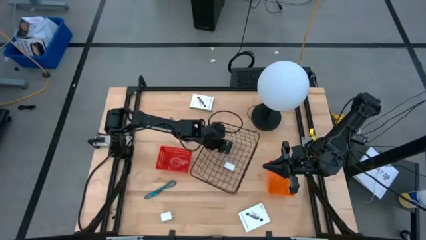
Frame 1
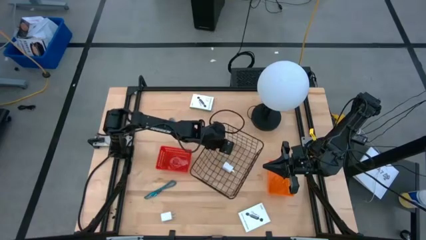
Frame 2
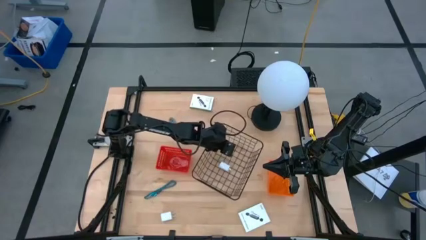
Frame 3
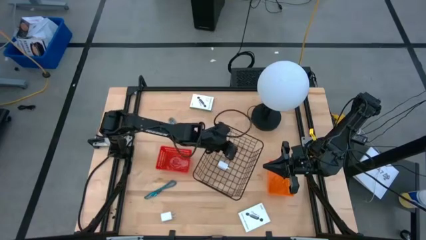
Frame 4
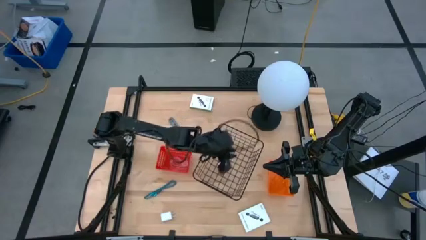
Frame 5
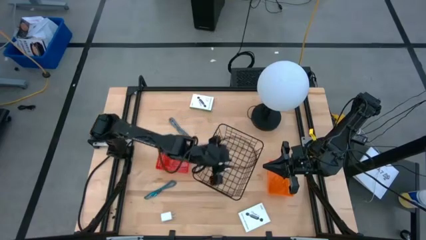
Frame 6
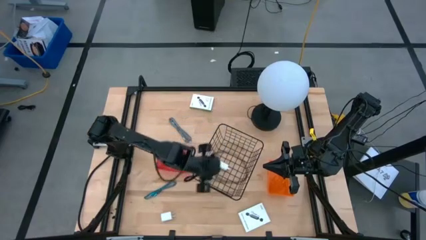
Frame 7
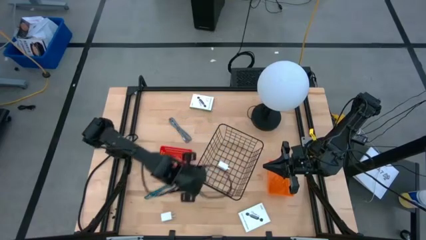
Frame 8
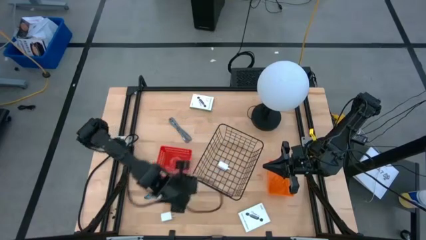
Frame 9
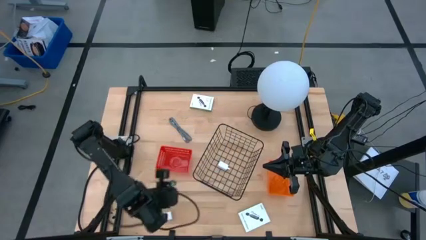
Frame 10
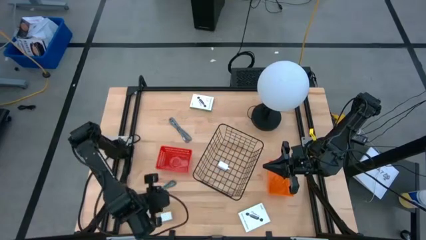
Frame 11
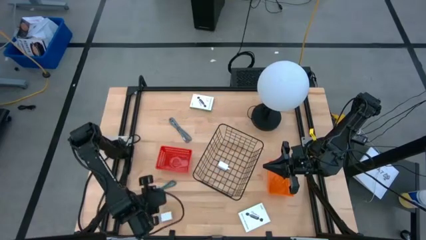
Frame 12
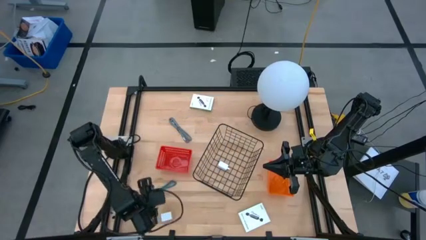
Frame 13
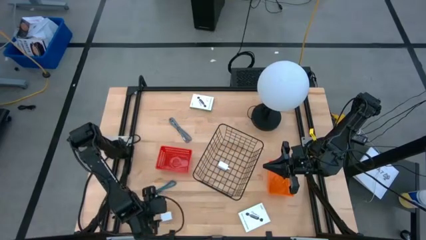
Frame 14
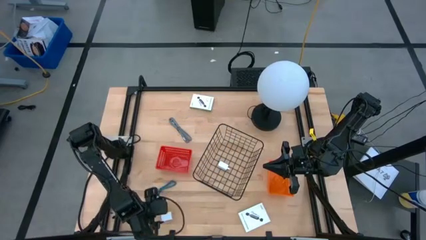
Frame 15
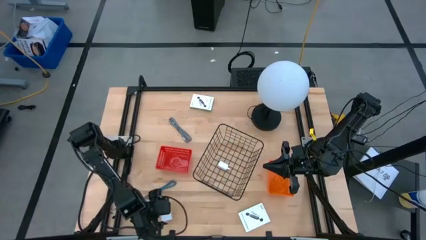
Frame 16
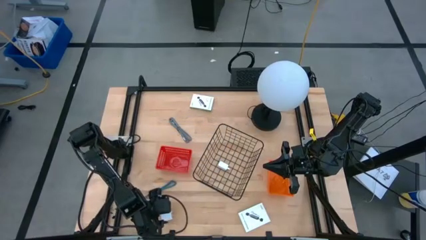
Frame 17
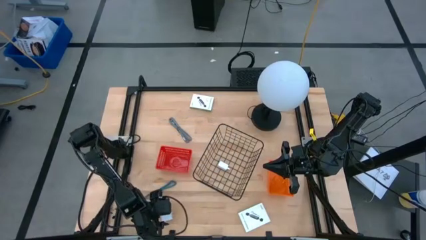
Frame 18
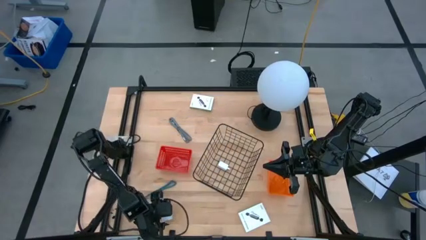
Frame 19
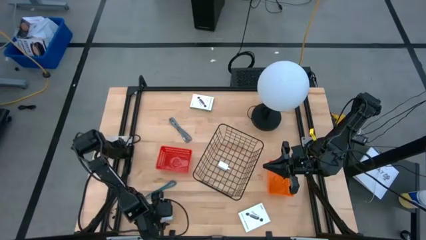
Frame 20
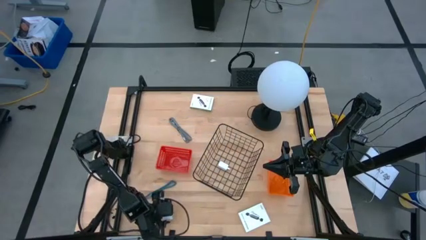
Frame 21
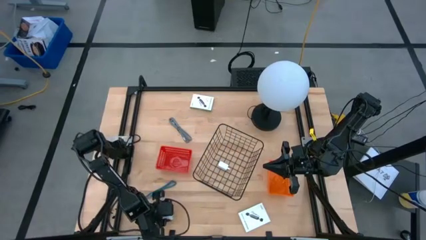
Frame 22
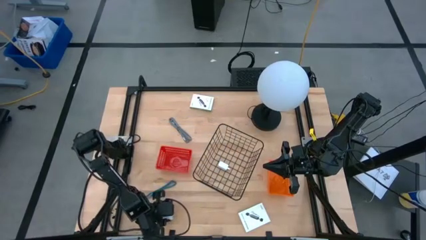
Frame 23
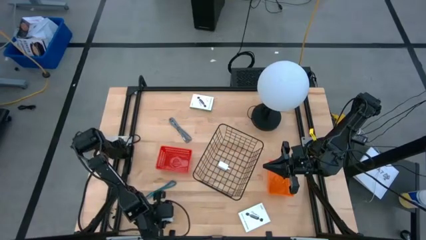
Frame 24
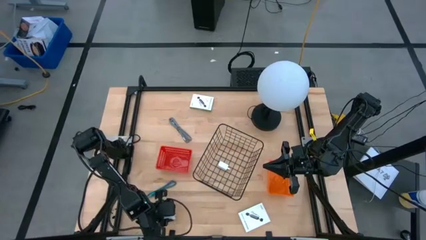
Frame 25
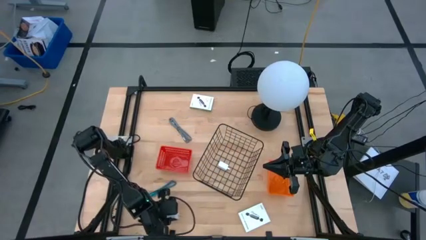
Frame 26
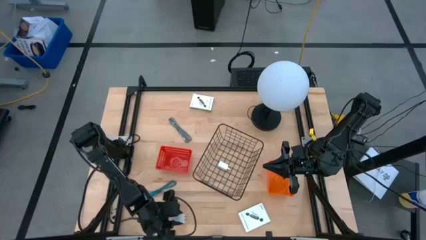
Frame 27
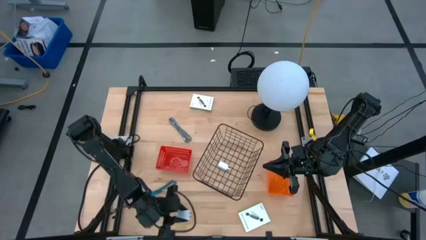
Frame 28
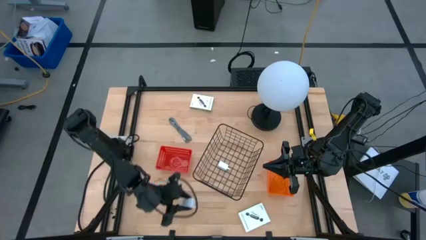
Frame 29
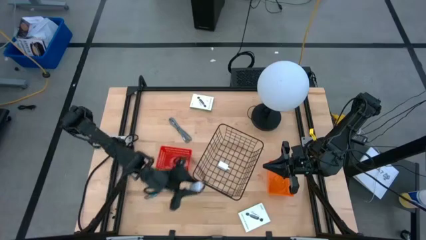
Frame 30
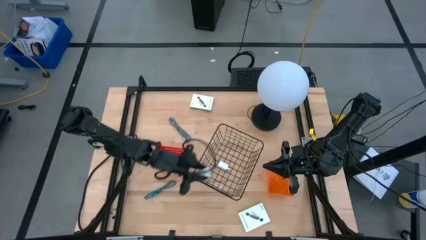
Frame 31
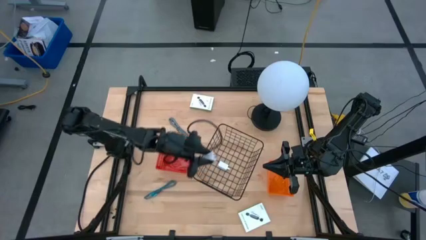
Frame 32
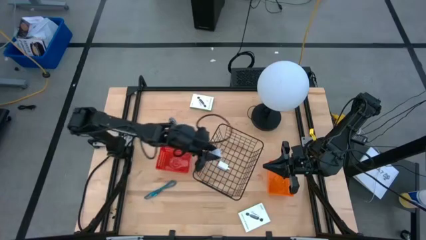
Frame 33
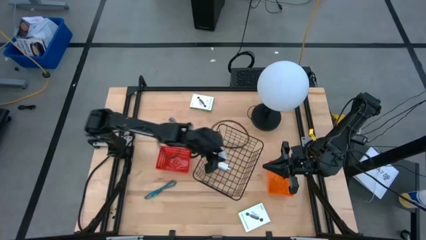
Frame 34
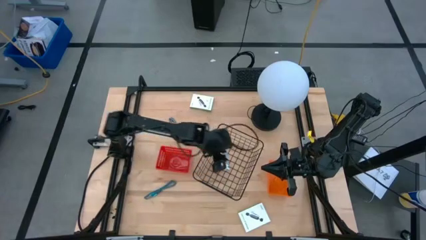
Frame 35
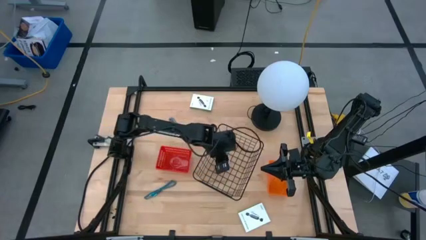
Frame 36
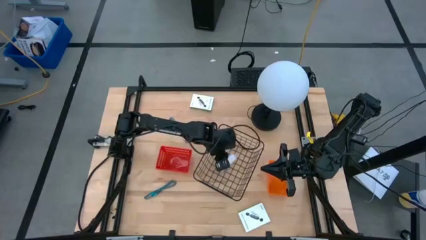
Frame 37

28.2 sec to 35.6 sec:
Task: Pick and place items into bin
Put the charger adapter into the black basket

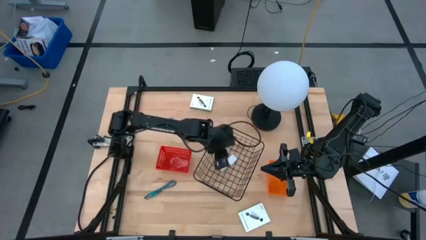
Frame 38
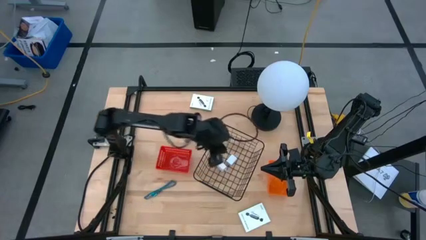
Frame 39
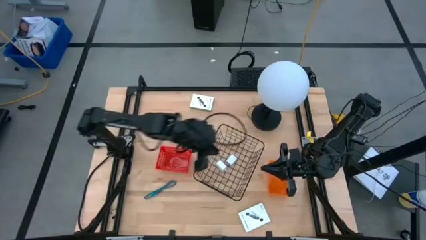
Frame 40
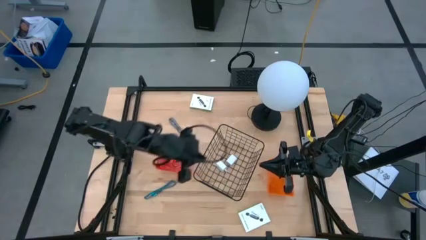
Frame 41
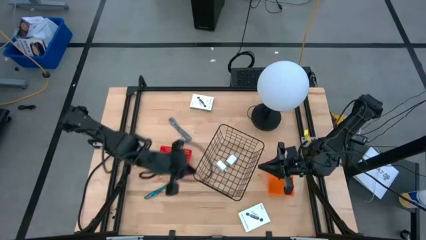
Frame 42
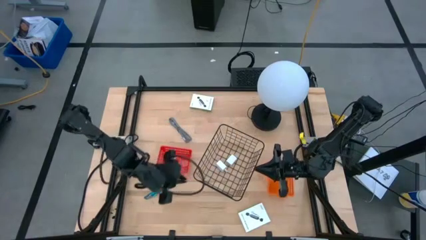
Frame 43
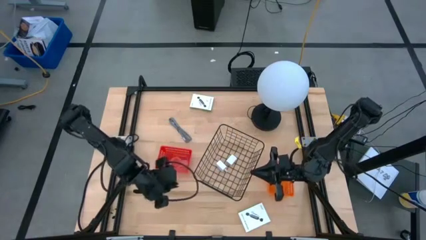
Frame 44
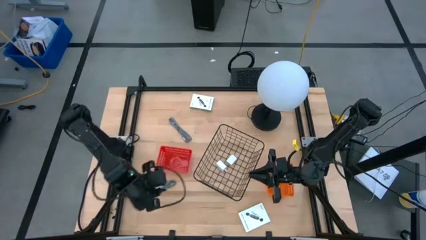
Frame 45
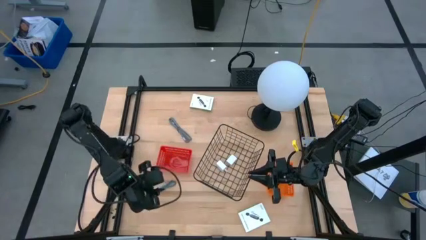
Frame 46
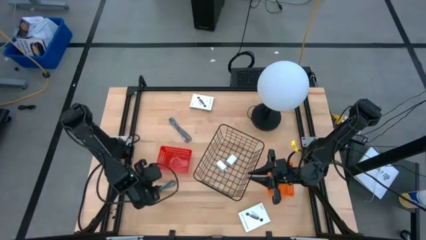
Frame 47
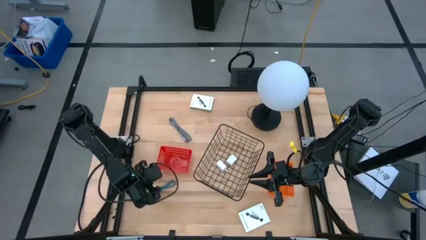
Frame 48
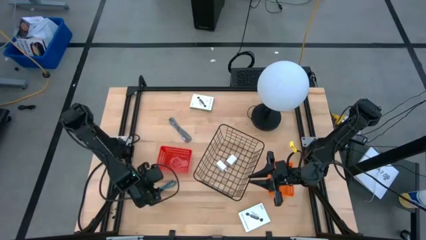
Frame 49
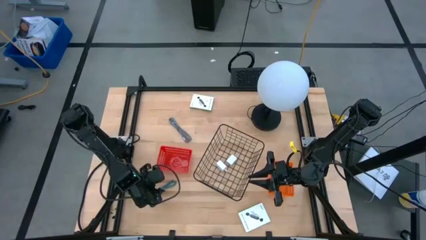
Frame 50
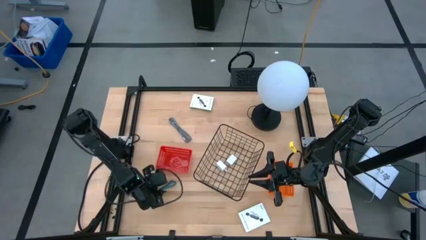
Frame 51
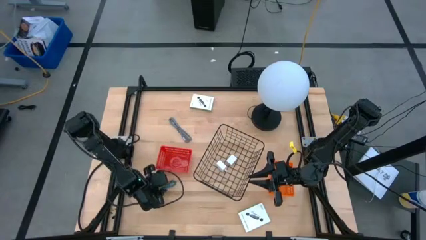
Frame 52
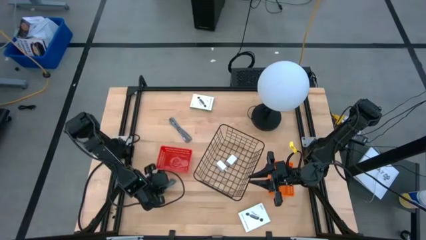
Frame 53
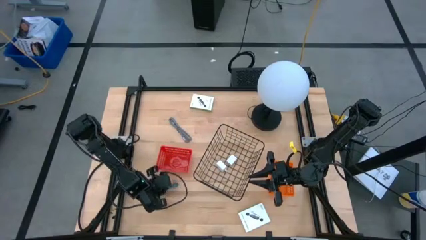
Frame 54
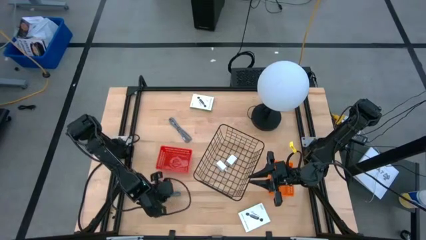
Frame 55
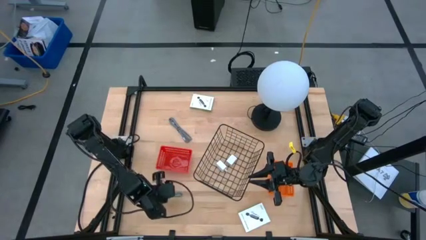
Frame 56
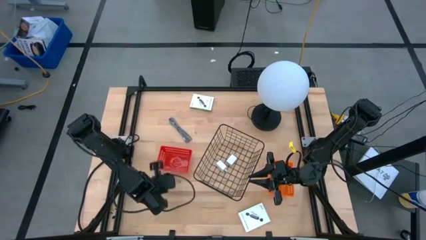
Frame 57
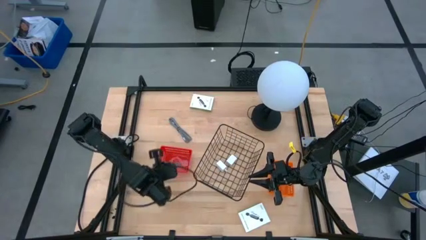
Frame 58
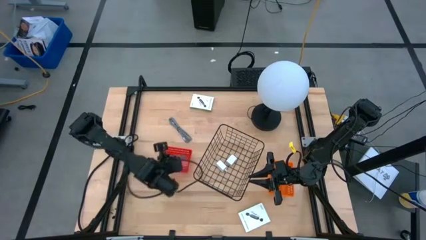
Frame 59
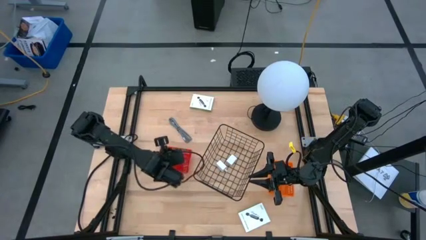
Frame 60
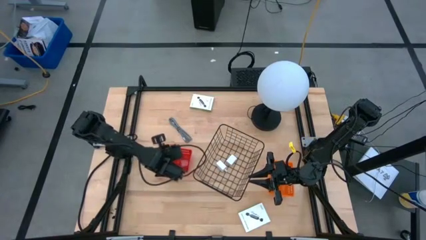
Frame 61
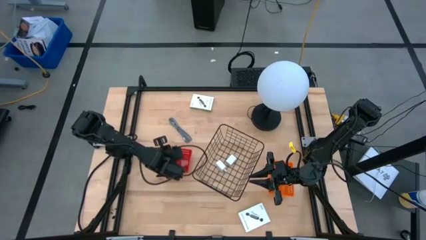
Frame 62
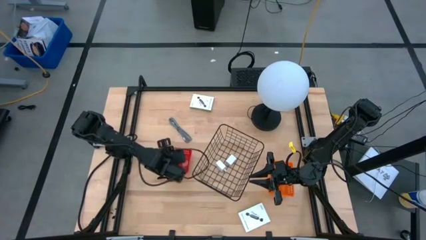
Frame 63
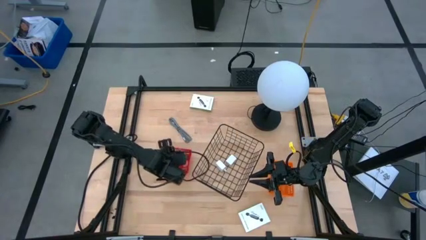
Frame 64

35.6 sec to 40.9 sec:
Put the blue USB cable into the red basket

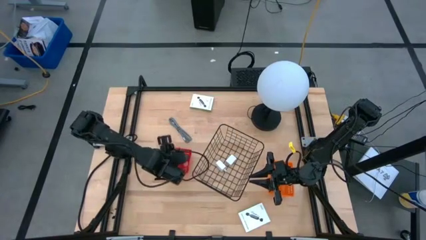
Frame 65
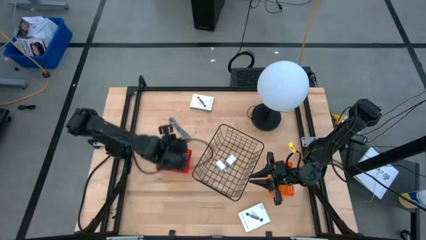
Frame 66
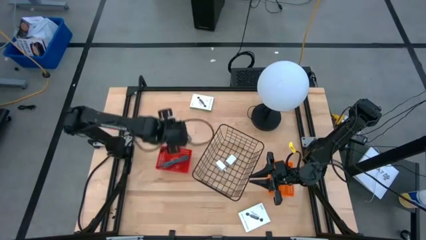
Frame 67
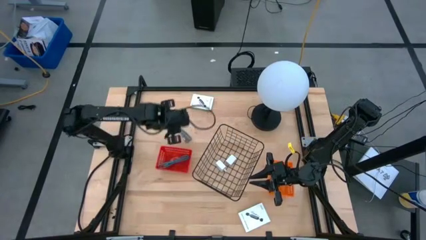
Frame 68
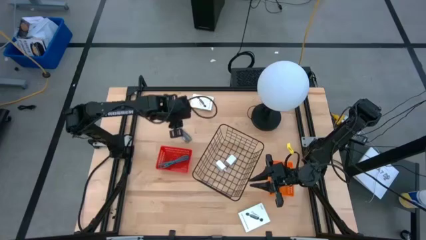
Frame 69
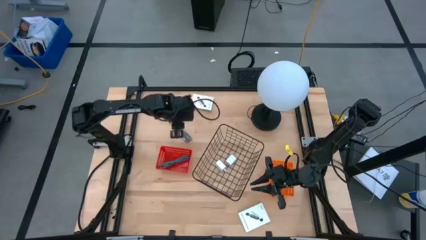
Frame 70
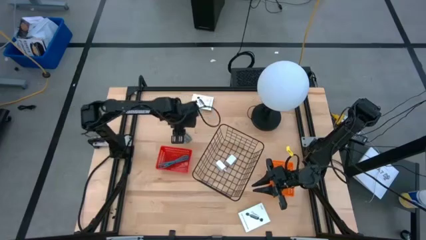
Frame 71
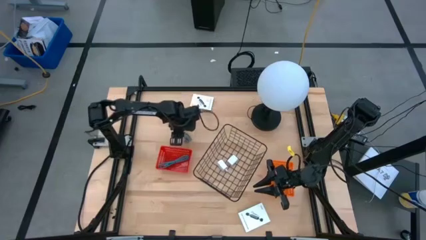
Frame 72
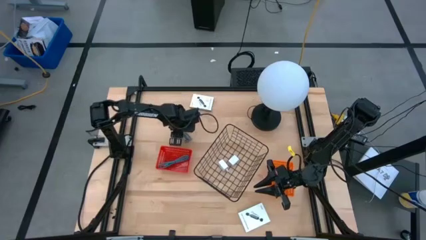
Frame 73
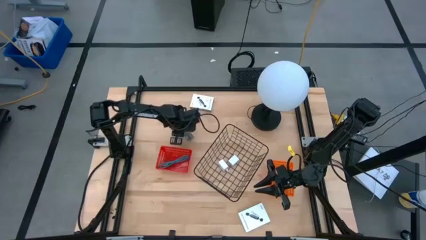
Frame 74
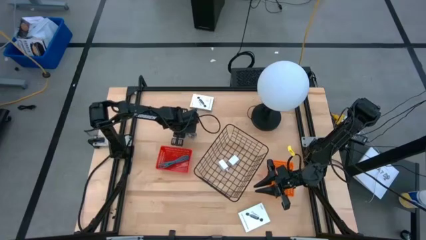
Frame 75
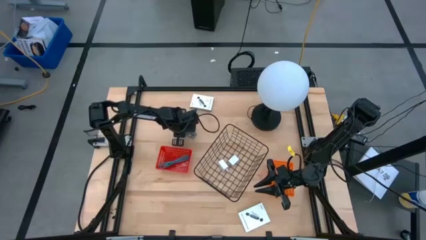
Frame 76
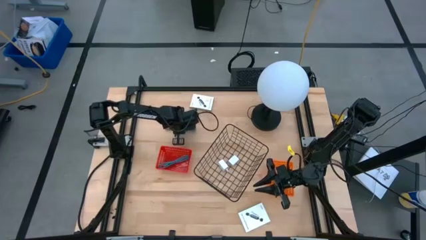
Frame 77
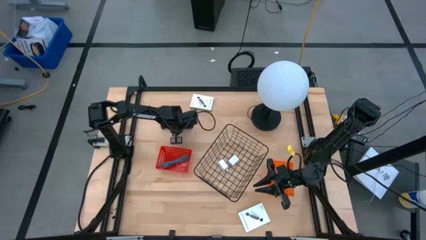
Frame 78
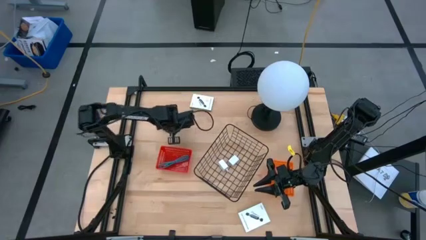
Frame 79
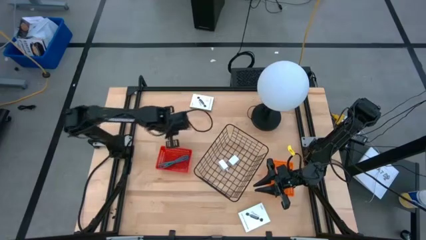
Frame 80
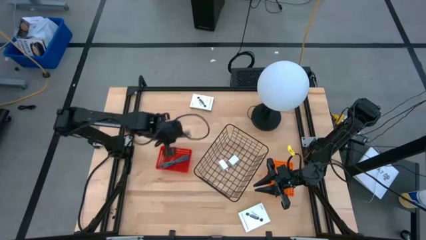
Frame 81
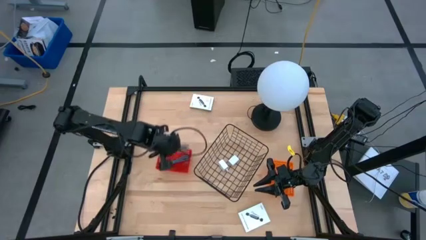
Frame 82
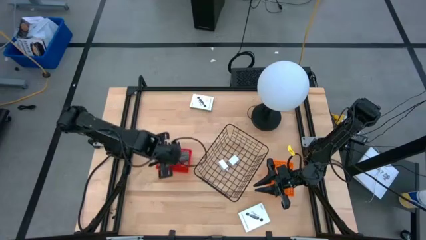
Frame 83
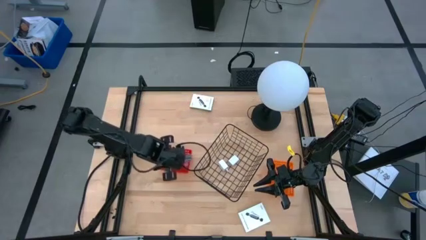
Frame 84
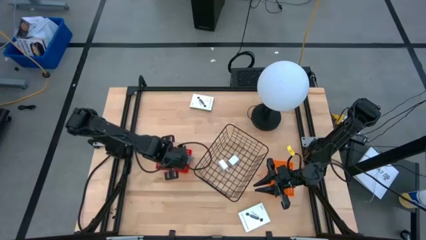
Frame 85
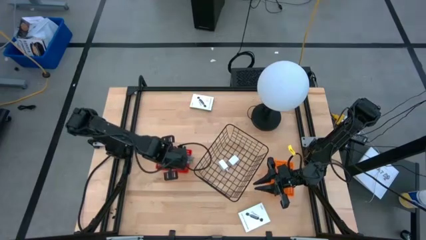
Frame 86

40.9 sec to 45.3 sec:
Put the white USB cable into the red basket
